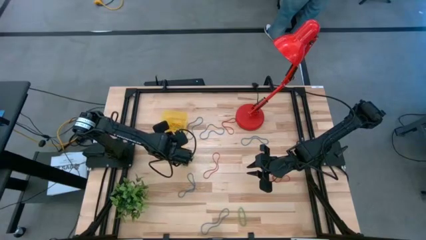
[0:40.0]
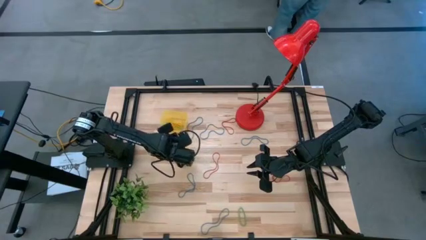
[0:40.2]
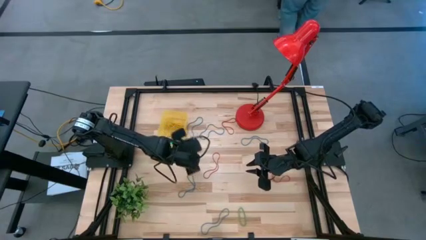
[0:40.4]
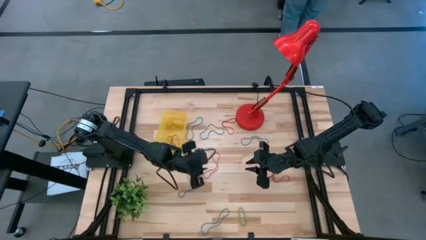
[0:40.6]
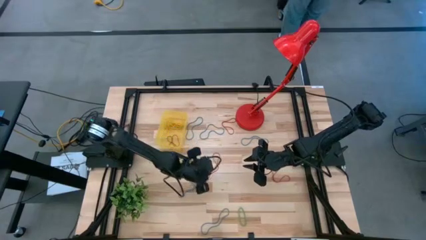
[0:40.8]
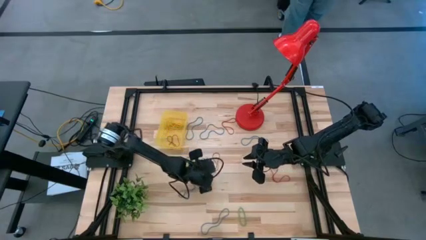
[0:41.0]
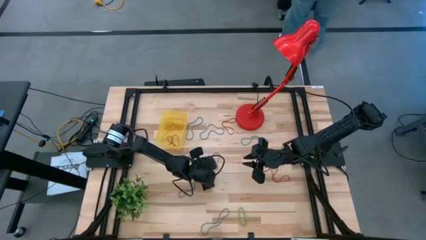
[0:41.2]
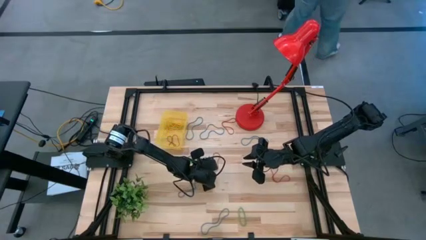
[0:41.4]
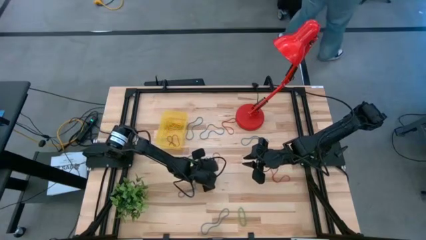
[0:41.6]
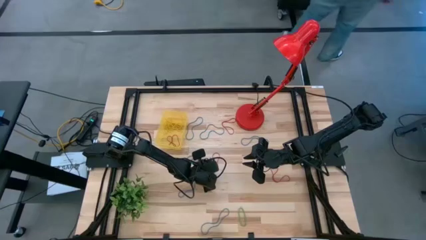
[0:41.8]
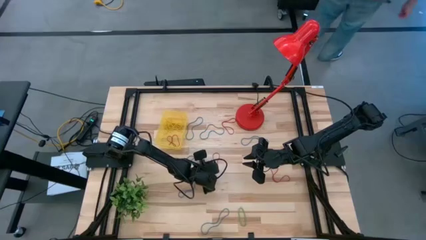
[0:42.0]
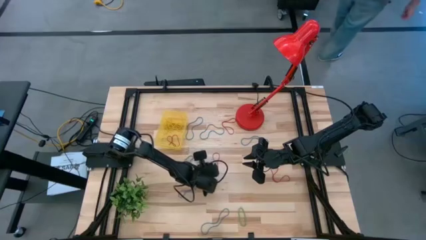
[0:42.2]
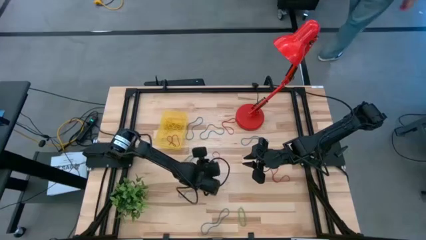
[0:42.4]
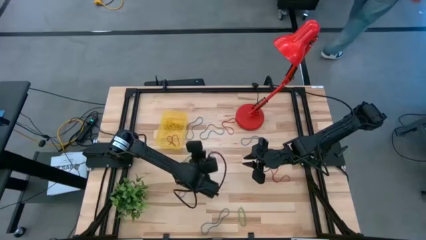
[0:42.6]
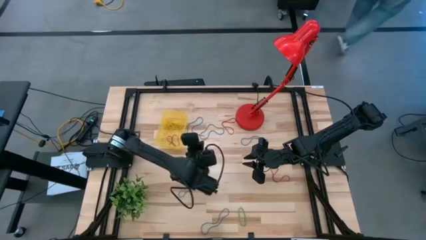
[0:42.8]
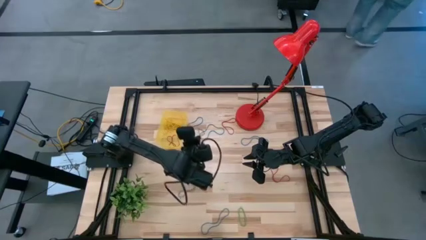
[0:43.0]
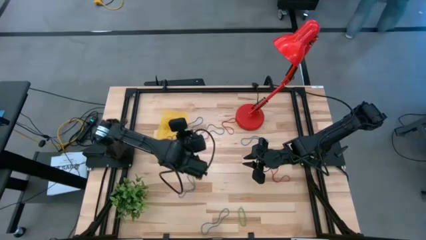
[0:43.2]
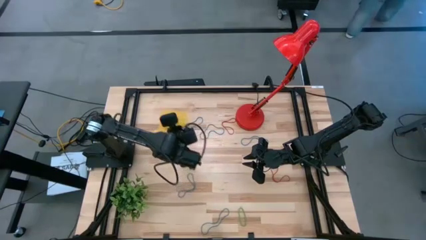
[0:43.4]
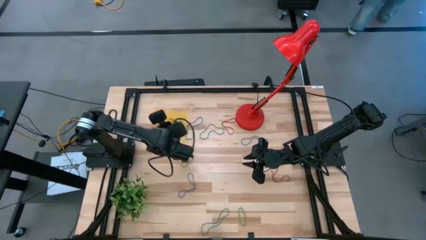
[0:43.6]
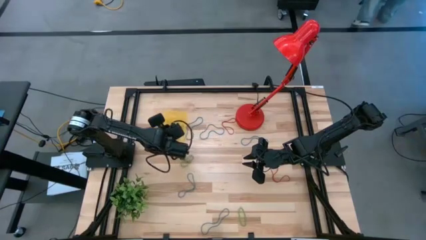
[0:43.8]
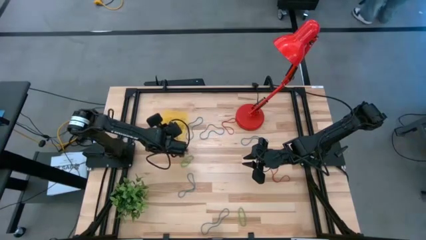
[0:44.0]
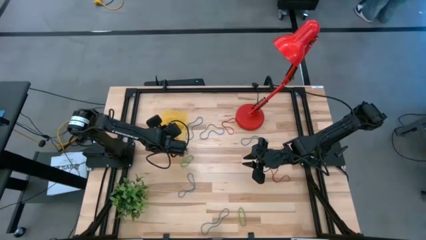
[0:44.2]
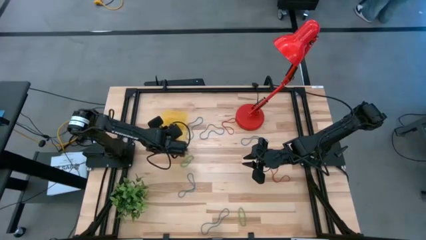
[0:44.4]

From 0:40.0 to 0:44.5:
Task: Pick and place items into bin
Put the red rubber band into the yellow bin

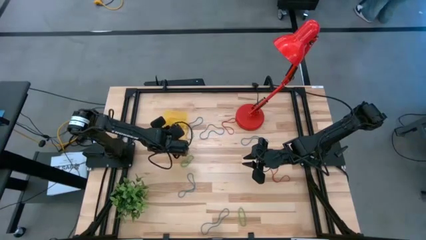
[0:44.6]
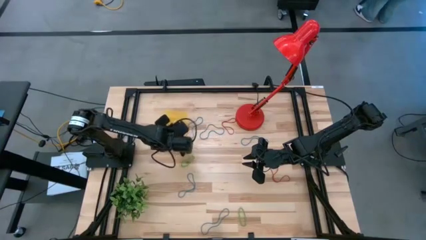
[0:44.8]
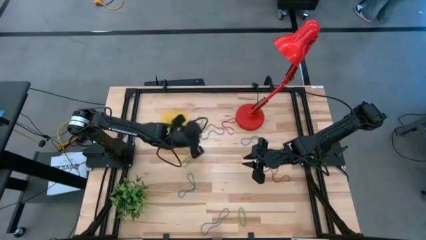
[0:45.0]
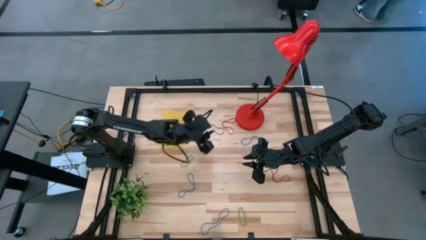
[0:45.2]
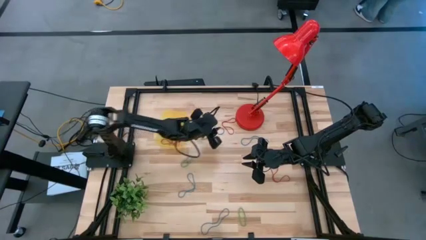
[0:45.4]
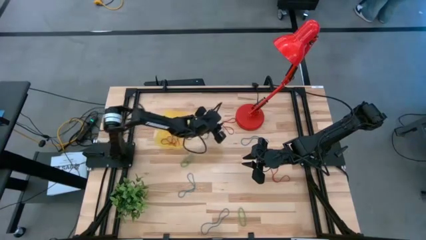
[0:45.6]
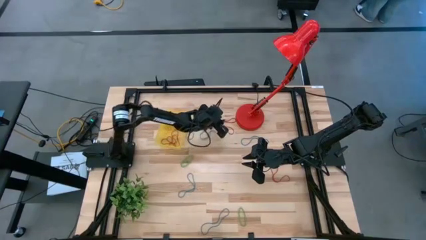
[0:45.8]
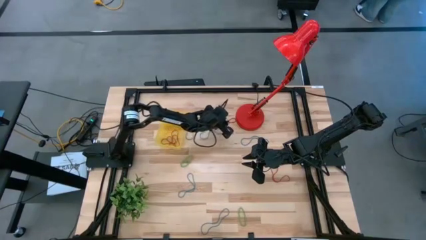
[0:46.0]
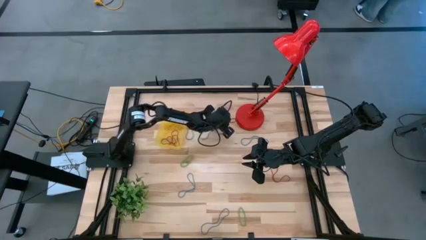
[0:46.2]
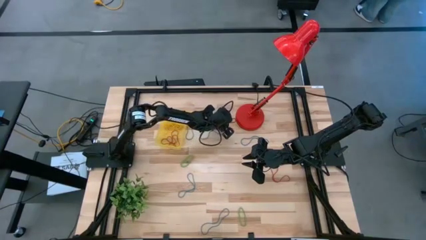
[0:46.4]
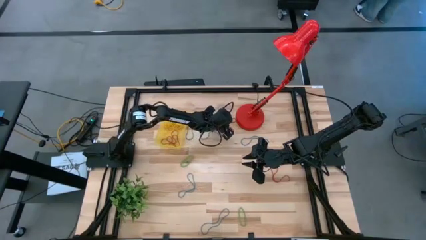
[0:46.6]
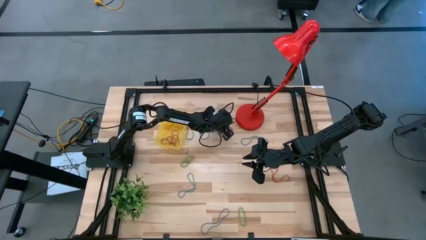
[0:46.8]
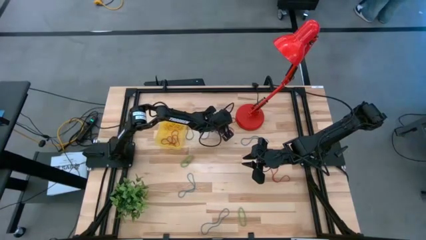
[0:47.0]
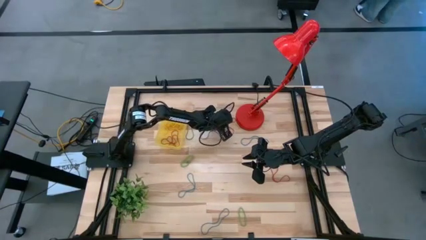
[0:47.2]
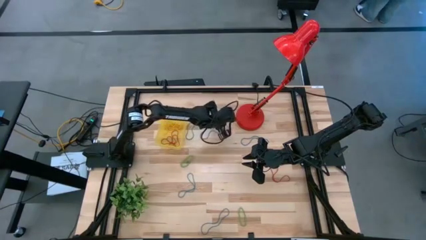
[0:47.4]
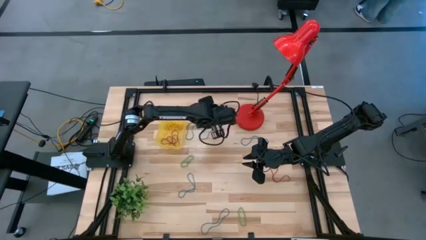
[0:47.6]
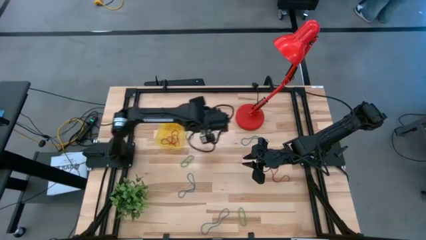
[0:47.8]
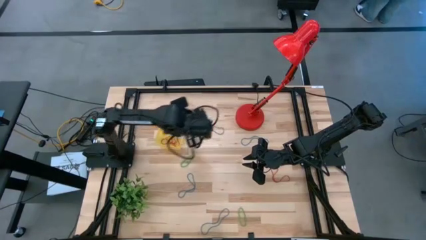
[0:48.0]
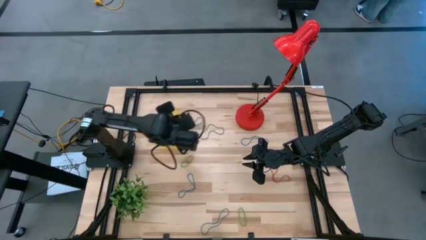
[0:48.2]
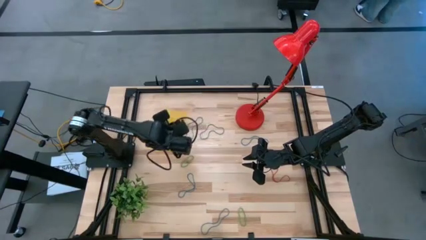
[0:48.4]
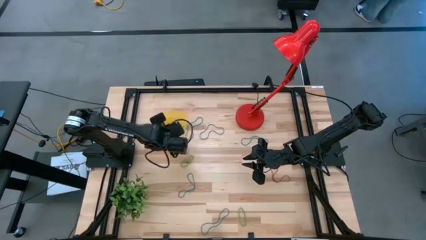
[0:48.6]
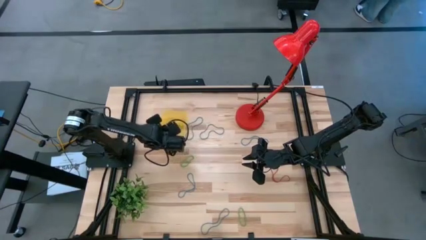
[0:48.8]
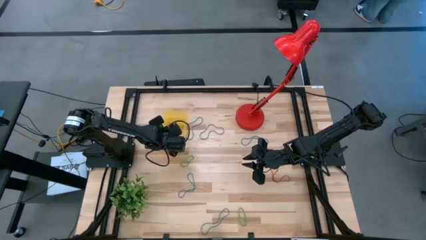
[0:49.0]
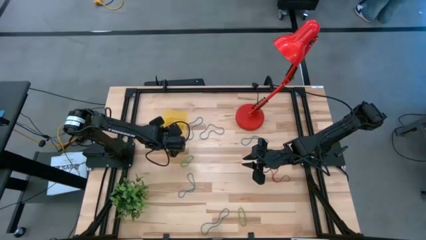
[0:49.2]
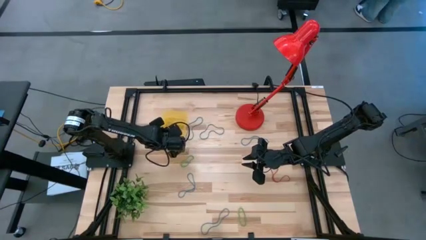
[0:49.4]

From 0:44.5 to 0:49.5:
Put the red rubber band into the yellow bin

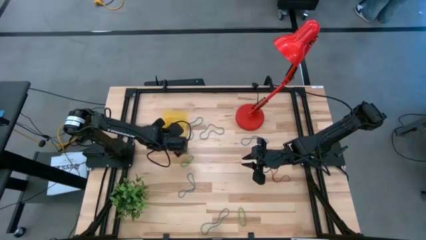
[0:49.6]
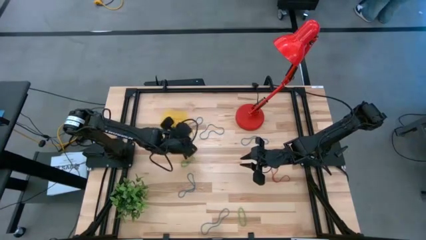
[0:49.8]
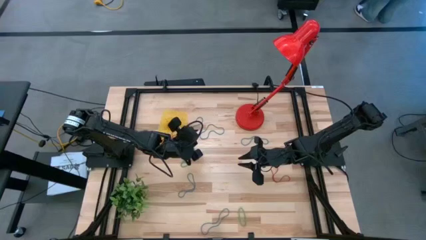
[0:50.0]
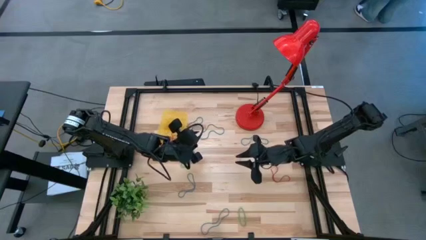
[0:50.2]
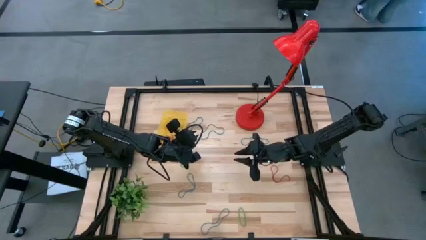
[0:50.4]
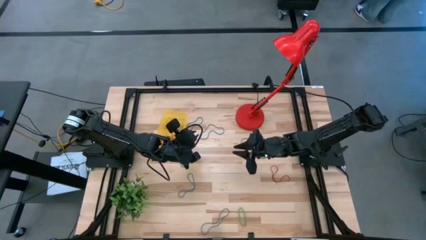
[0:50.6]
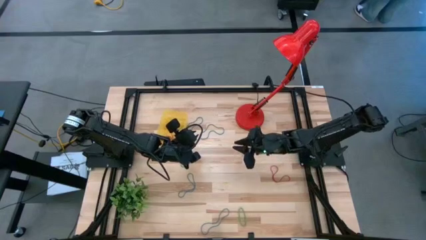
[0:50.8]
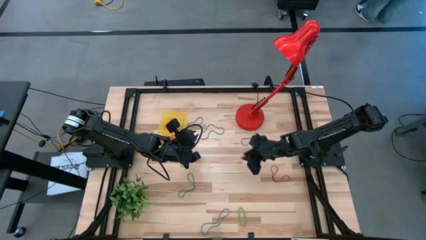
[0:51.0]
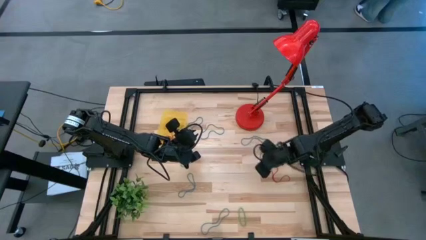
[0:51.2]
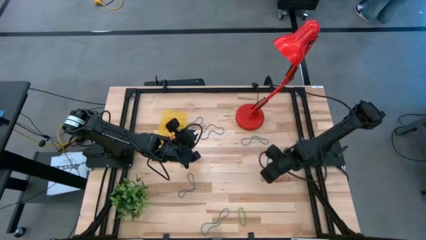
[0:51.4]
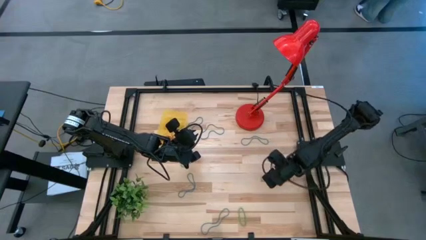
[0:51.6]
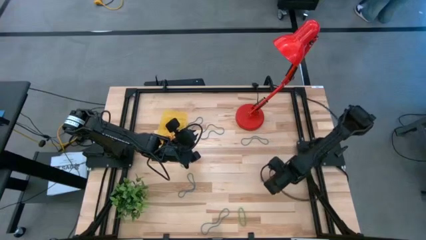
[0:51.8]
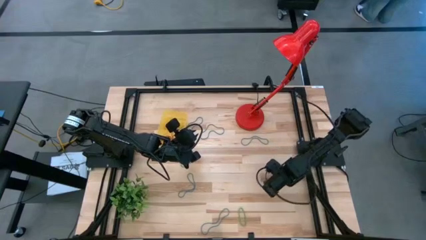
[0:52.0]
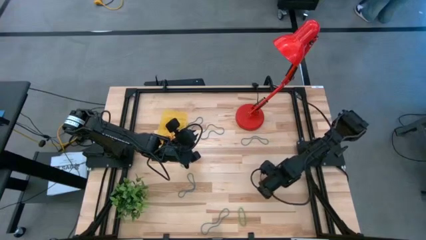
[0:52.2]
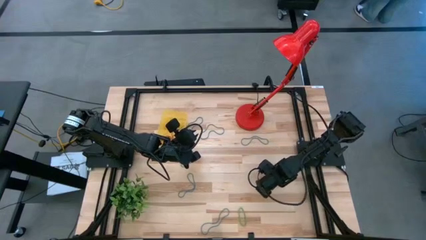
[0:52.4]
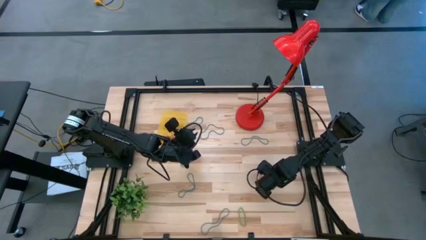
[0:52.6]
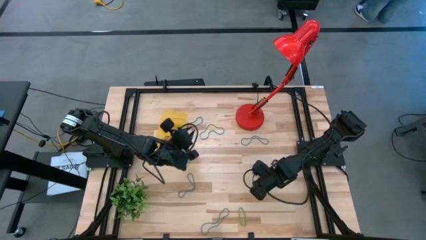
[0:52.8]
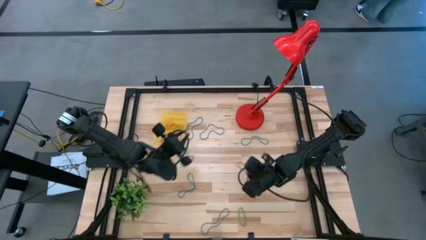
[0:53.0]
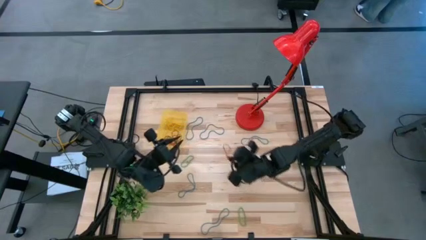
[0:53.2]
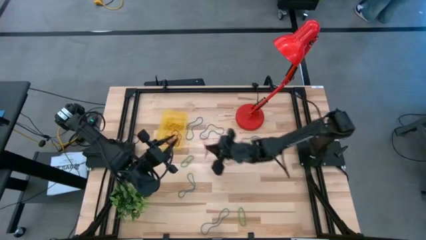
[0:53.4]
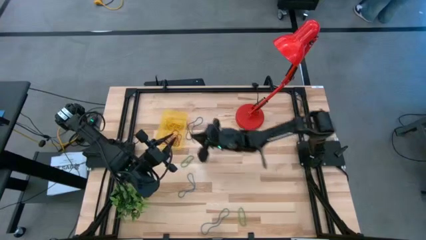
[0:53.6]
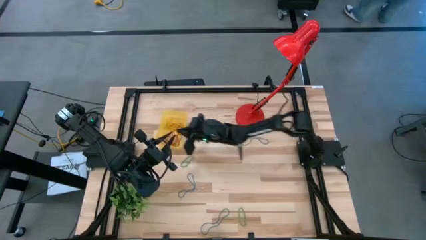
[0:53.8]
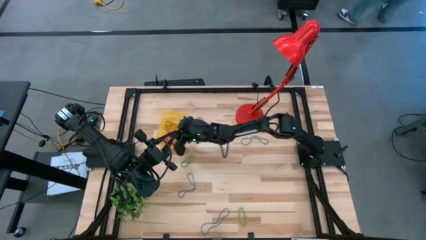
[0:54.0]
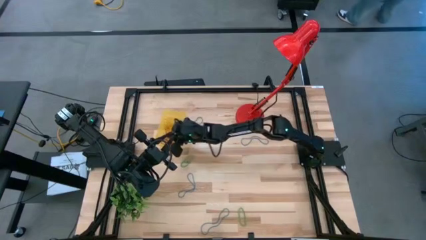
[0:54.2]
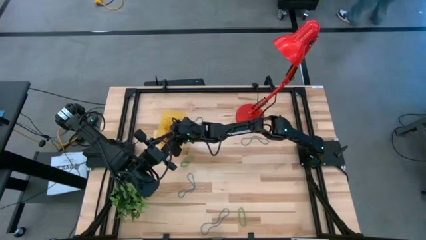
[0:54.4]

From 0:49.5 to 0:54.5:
Put the red rubber band into the yellow bin

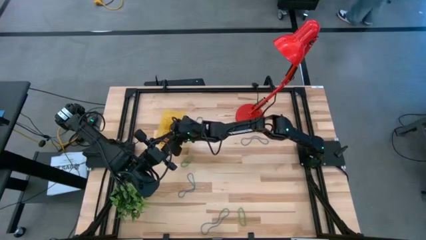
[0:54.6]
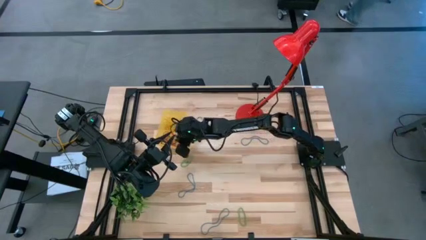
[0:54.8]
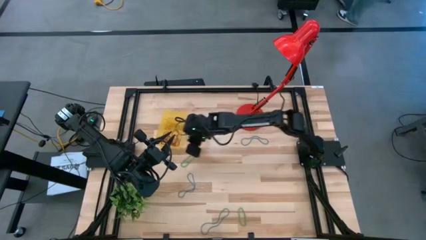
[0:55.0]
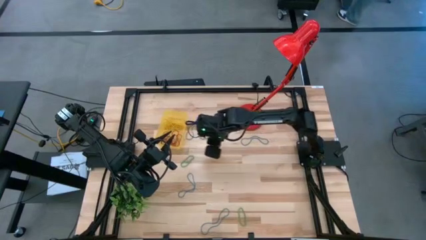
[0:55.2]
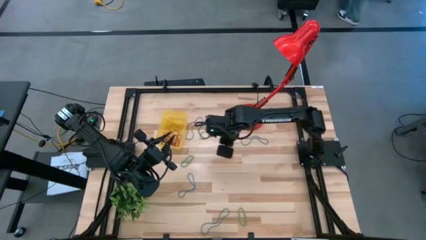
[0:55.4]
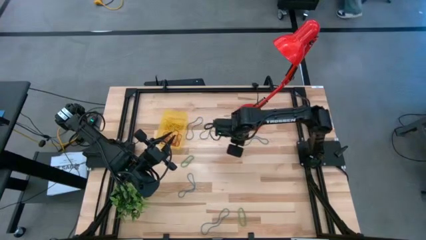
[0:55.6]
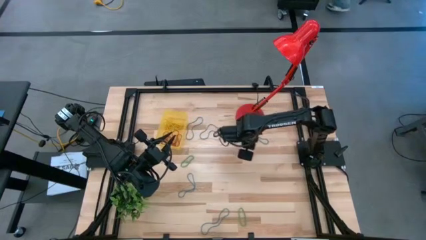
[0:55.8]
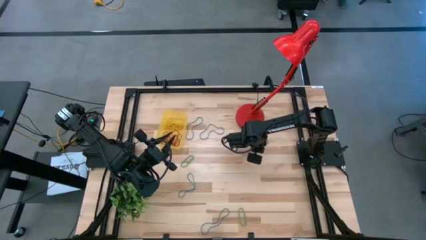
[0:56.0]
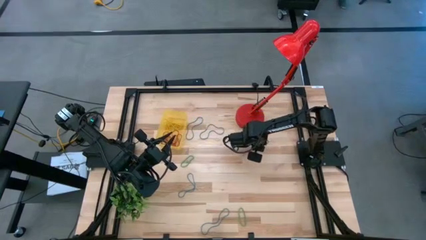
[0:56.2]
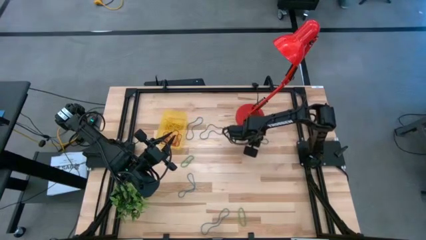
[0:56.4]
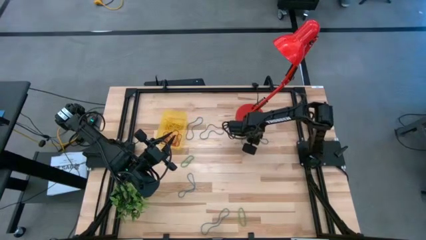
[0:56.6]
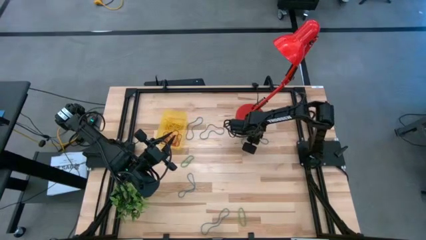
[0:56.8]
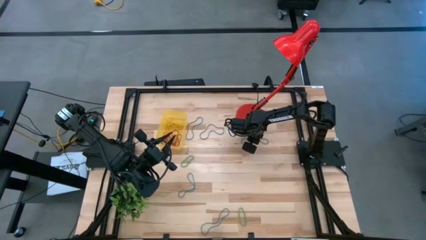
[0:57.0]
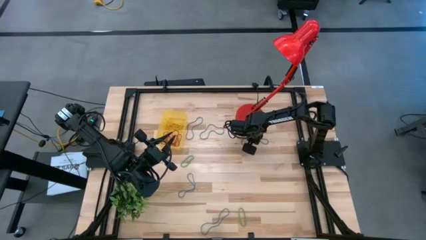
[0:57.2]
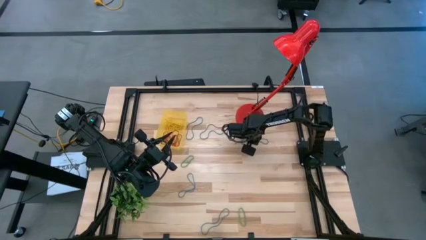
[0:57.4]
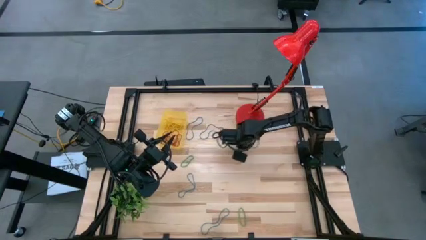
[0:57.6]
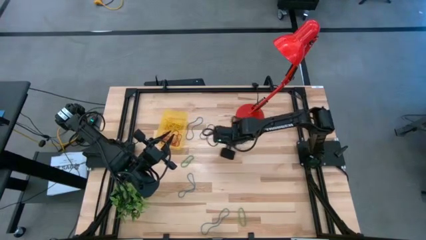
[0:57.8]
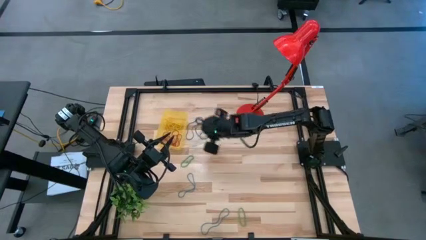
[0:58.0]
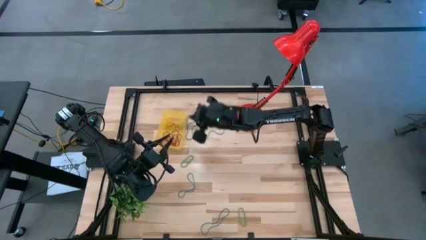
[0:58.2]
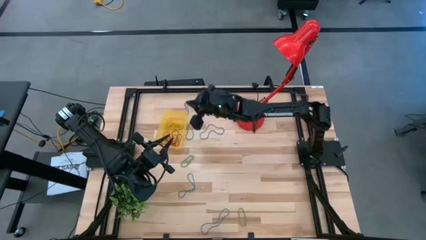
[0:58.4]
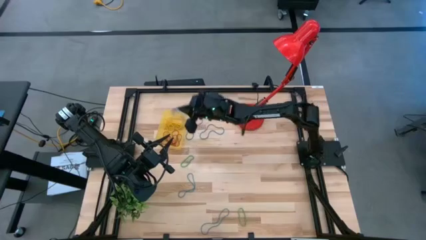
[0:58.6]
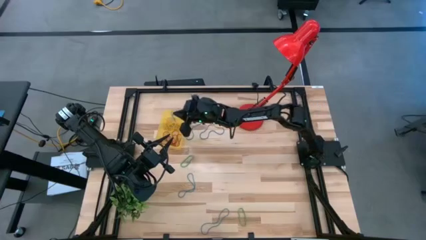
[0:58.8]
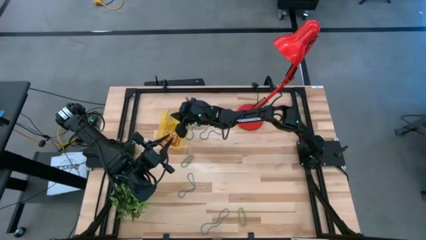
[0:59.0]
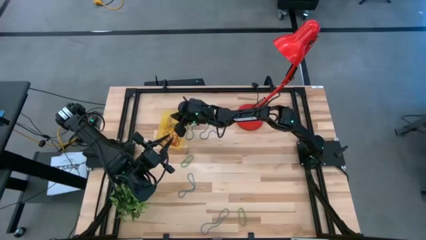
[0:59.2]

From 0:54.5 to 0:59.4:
Put the blue rubber band into the yellow bin
